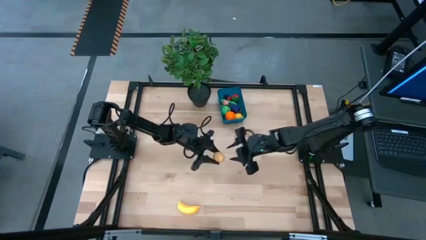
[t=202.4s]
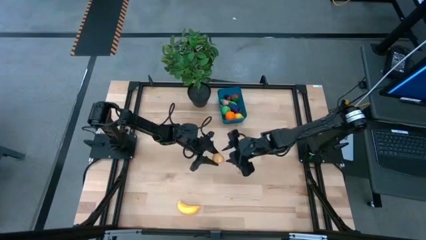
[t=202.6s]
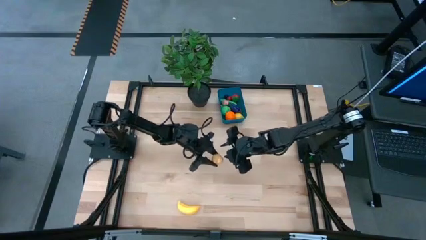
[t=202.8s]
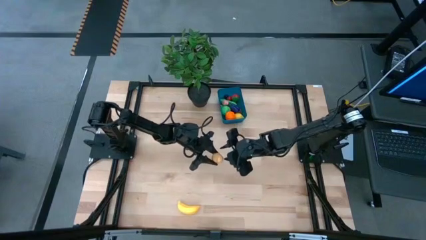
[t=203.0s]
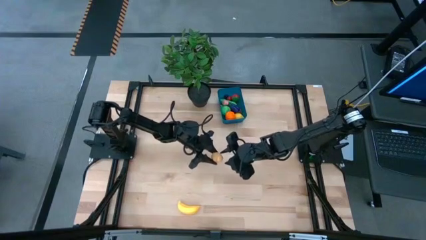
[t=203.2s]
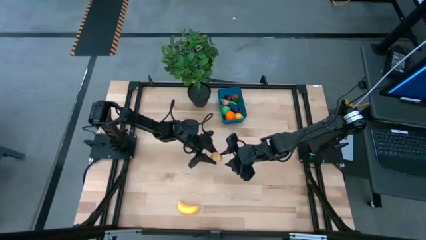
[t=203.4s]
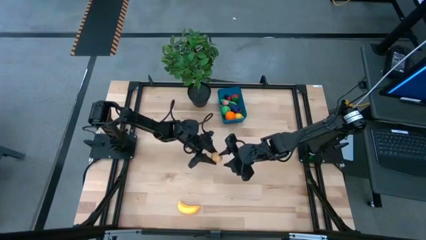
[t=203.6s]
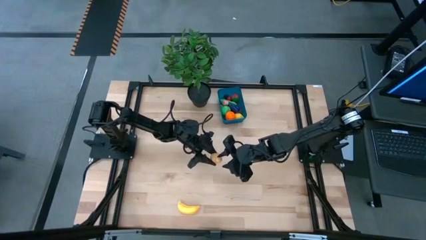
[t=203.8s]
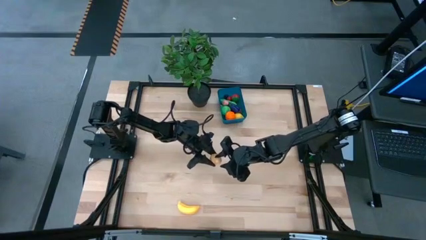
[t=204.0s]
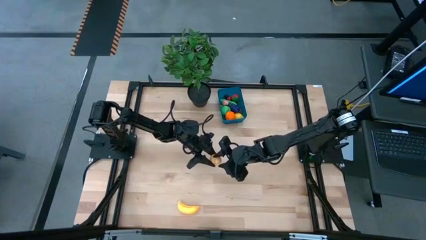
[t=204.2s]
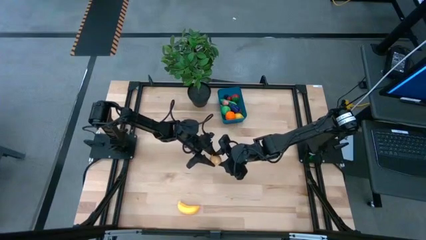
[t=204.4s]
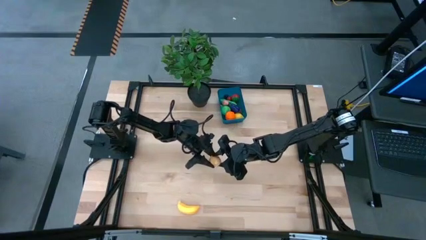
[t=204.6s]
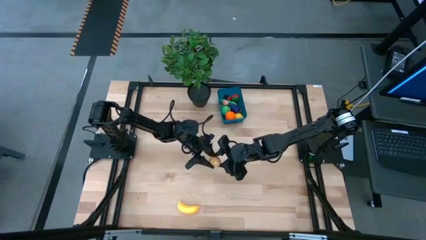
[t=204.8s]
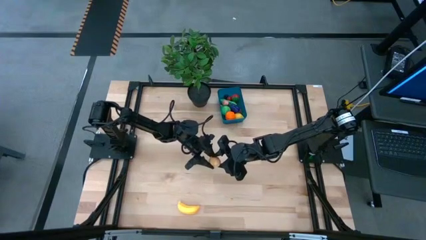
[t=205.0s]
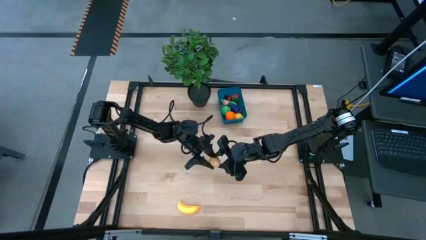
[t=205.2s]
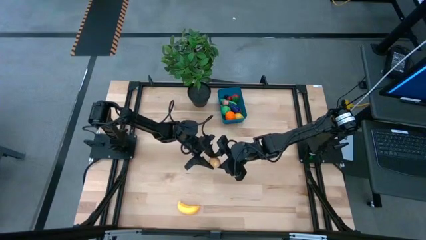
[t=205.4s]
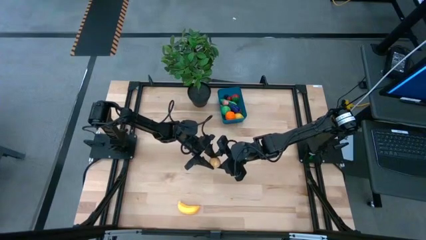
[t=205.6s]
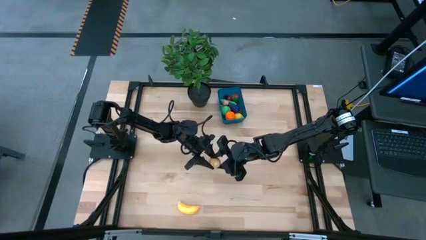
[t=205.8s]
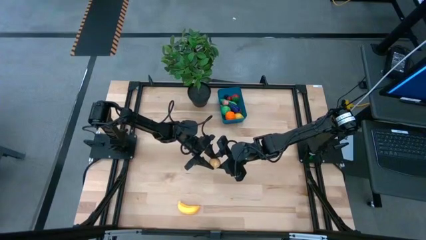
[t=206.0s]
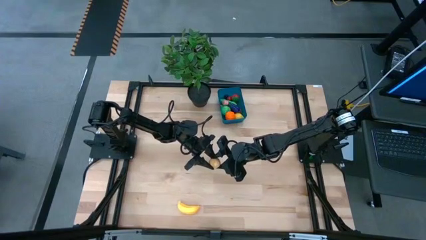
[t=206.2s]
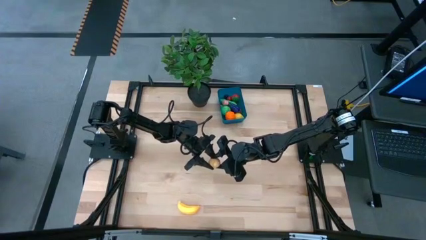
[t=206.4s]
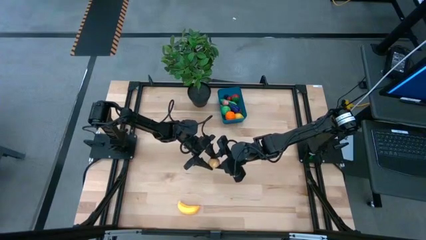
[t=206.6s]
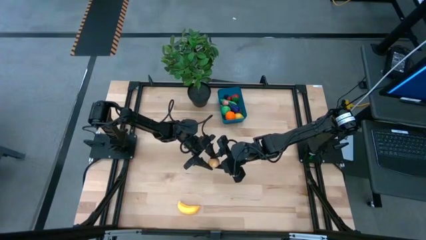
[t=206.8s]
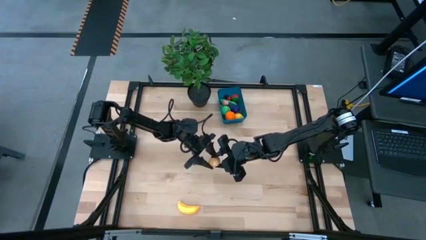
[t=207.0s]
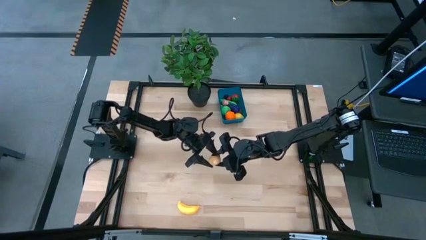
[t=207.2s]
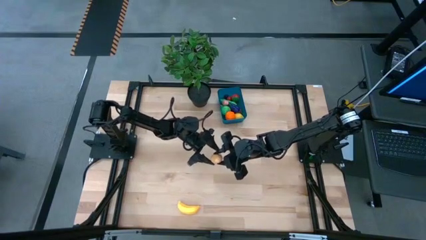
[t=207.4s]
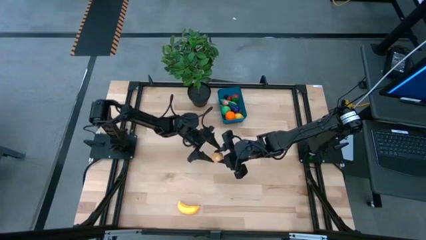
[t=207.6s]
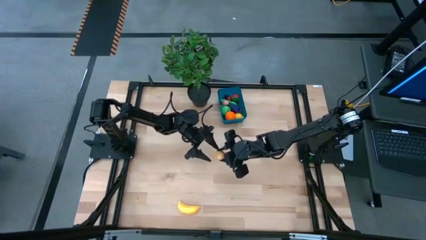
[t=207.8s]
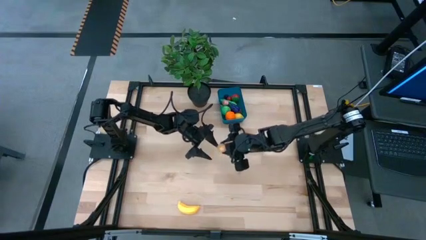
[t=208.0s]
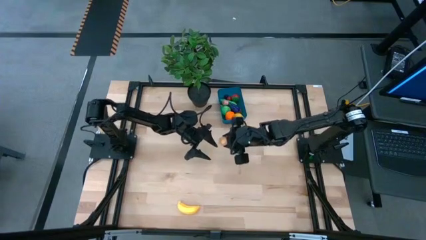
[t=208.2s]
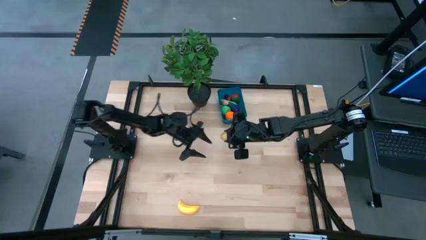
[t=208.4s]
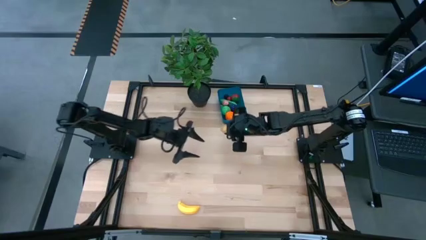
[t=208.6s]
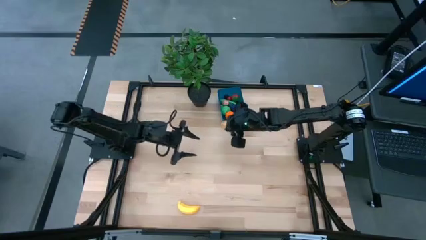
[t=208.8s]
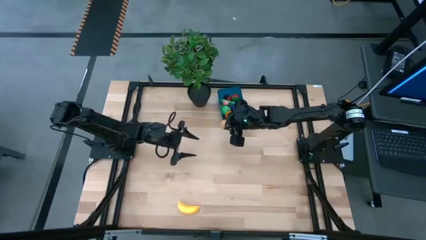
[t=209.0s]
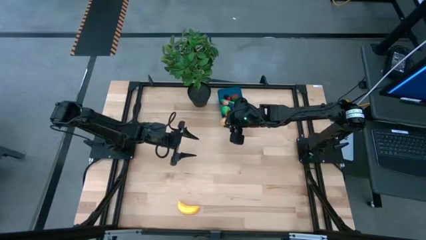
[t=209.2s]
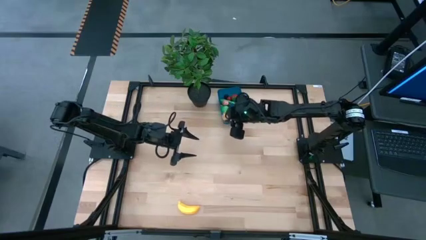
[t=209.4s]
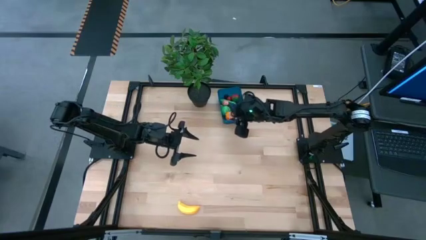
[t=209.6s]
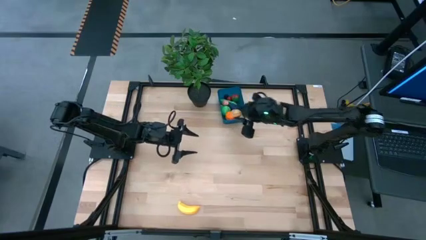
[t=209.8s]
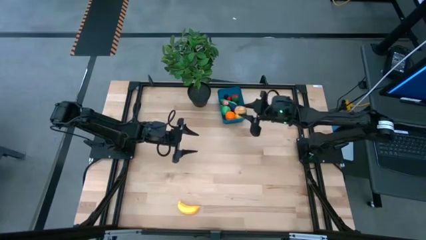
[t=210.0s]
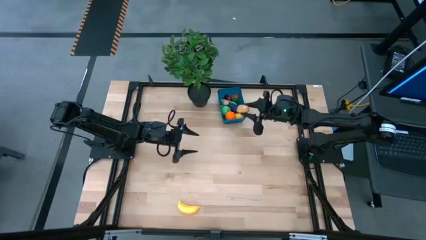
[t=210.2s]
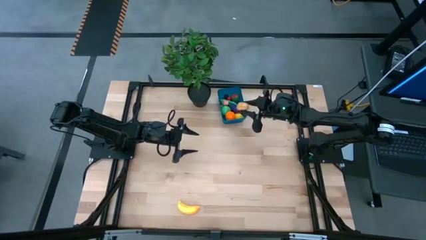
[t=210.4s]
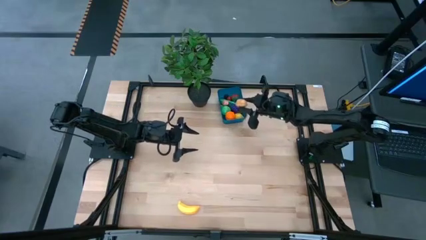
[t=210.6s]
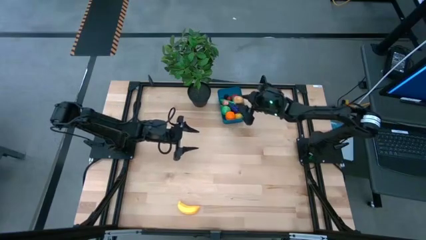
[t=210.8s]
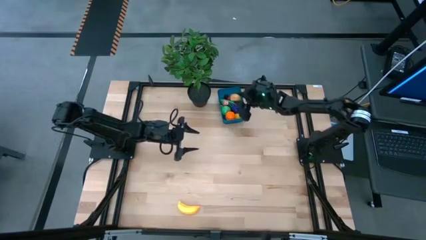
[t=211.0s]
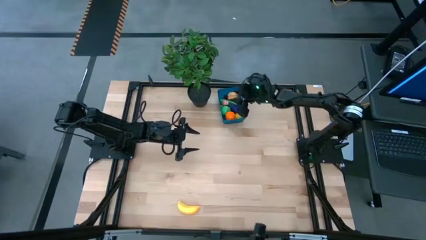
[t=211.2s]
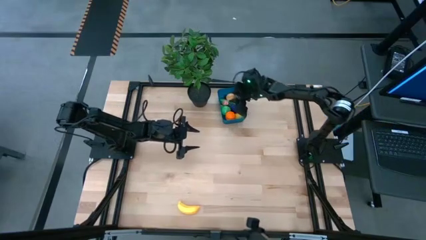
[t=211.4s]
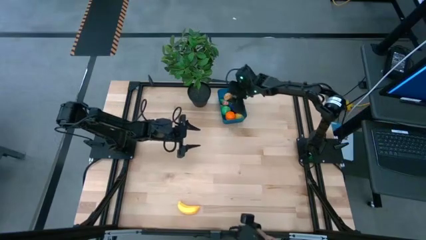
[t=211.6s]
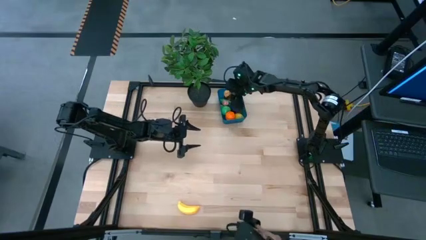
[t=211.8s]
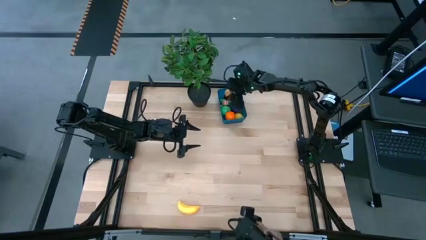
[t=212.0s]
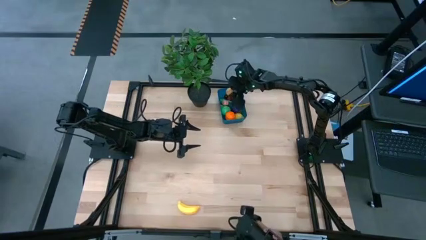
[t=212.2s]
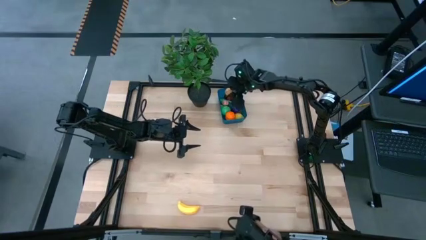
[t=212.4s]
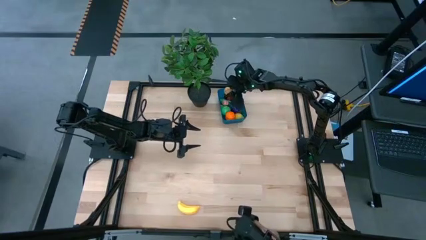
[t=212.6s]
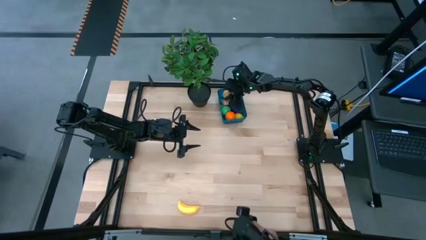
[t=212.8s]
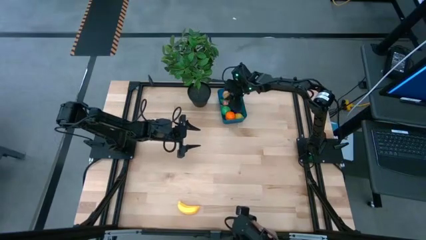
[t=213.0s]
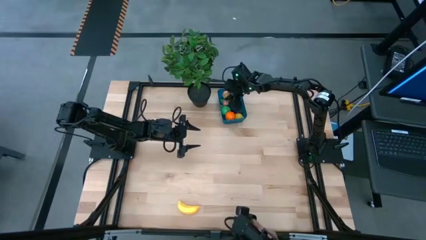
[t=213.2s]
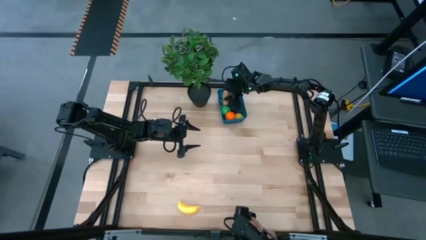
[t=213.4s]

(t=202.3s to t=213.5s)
Task: Pick and placing Produce into tupperware
Put the potato into the blue bin
